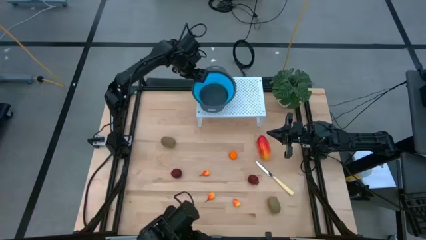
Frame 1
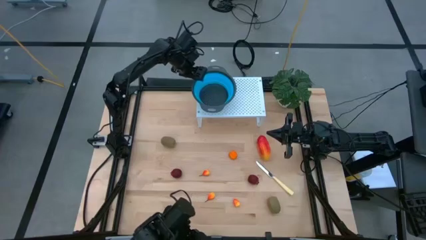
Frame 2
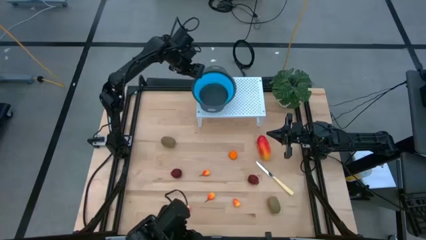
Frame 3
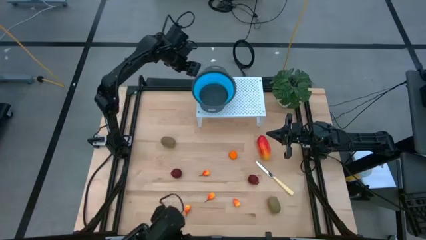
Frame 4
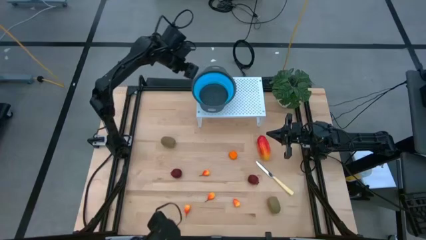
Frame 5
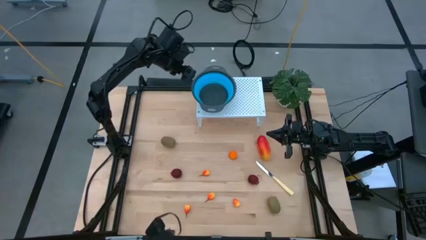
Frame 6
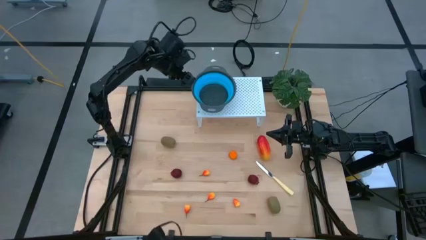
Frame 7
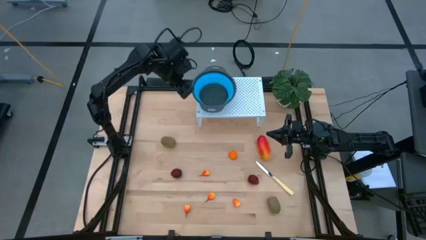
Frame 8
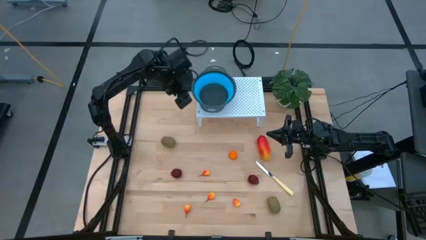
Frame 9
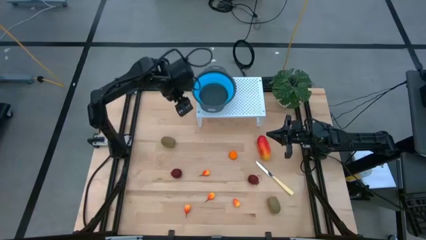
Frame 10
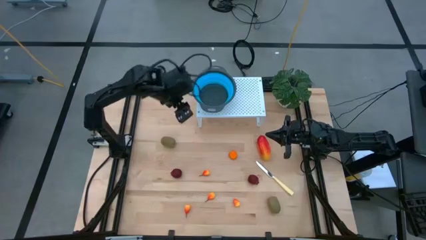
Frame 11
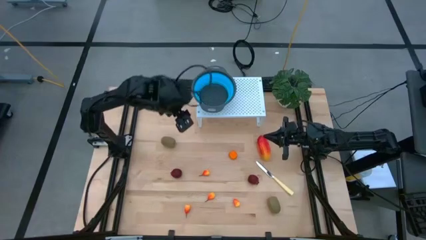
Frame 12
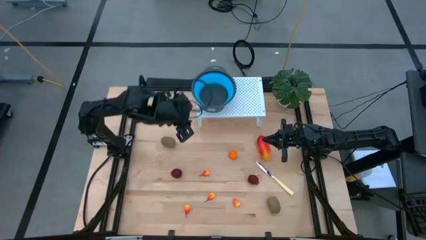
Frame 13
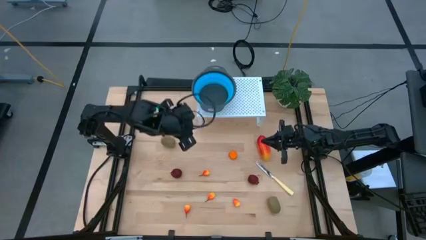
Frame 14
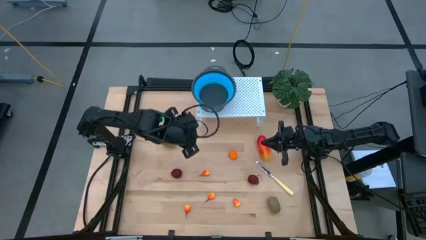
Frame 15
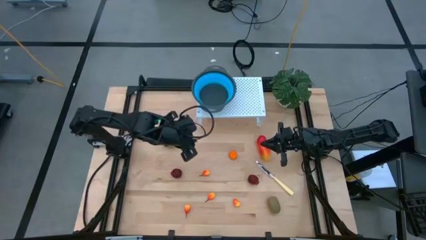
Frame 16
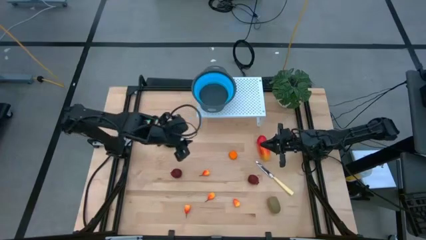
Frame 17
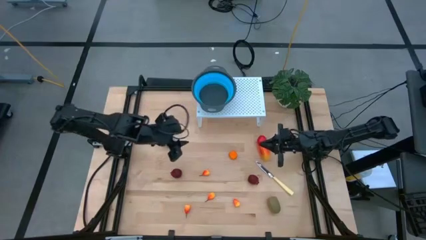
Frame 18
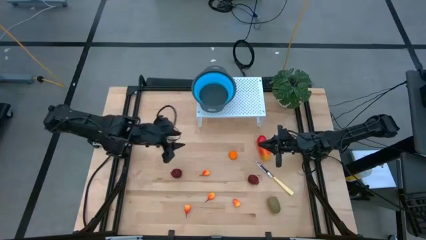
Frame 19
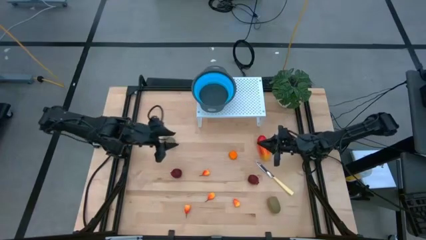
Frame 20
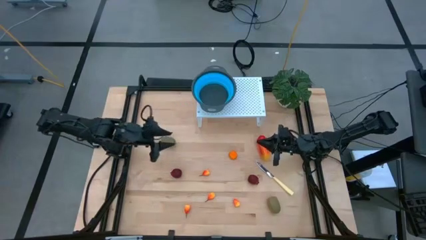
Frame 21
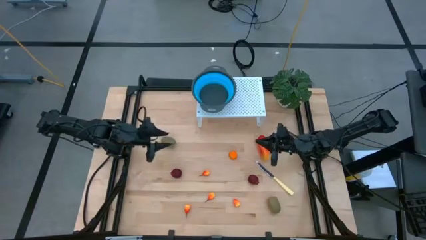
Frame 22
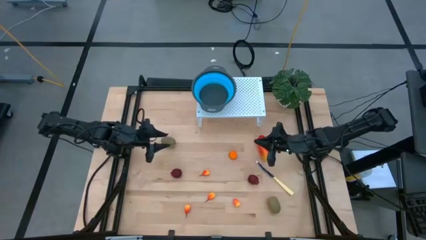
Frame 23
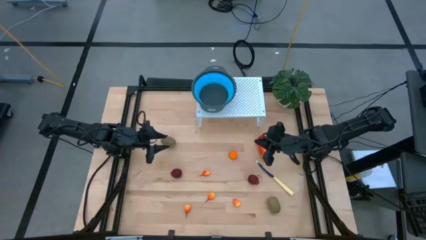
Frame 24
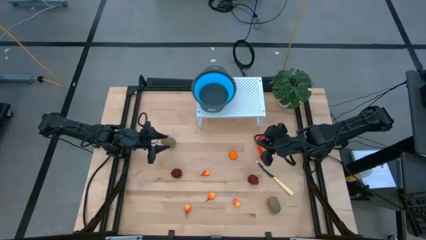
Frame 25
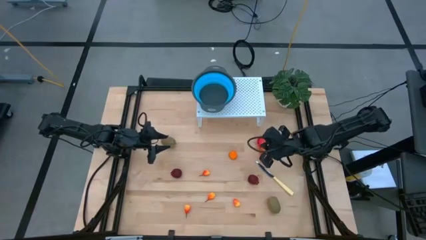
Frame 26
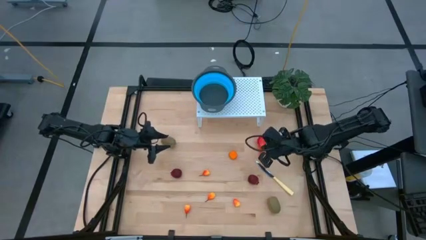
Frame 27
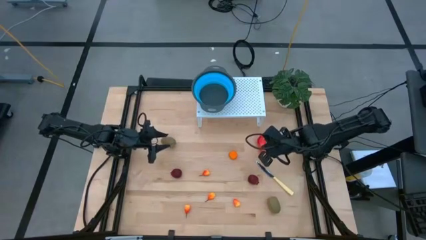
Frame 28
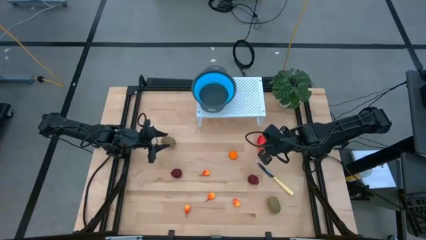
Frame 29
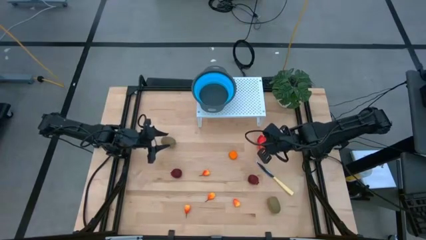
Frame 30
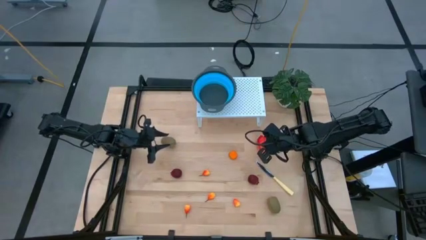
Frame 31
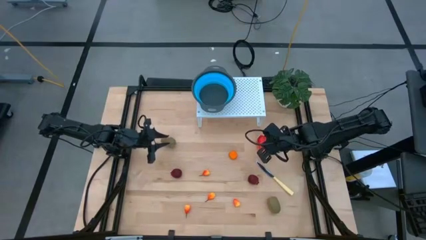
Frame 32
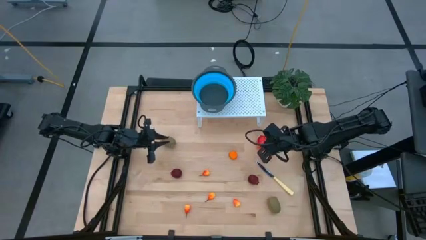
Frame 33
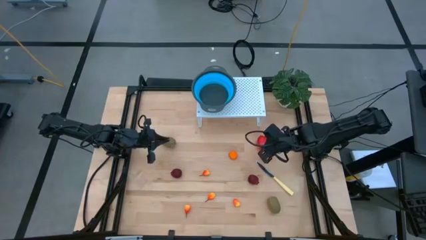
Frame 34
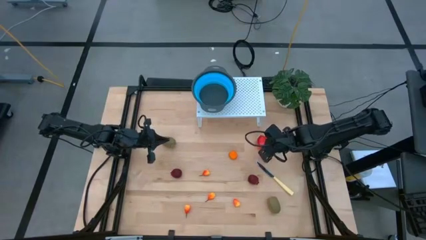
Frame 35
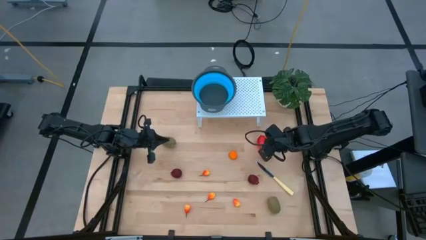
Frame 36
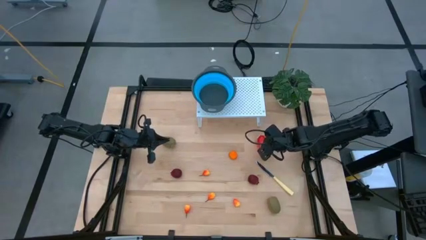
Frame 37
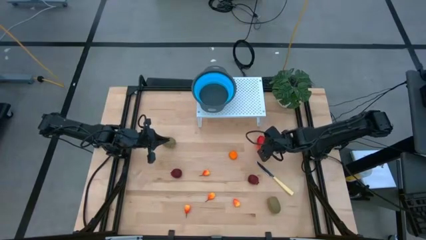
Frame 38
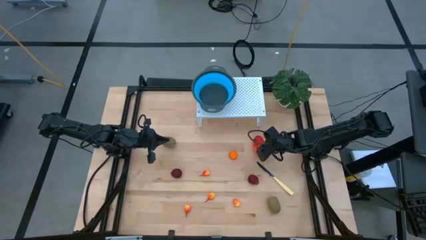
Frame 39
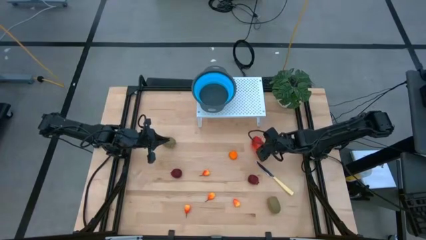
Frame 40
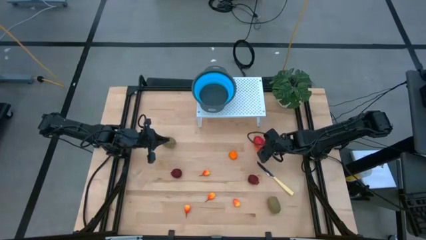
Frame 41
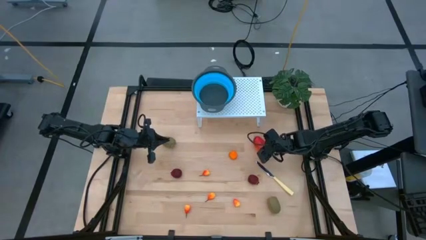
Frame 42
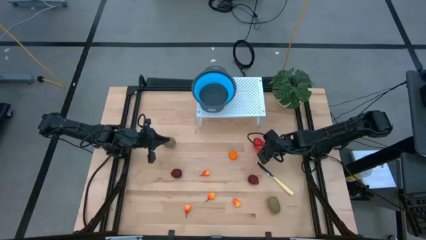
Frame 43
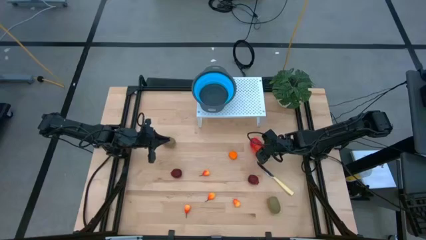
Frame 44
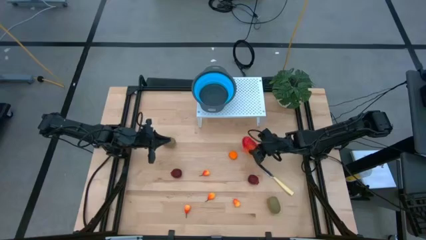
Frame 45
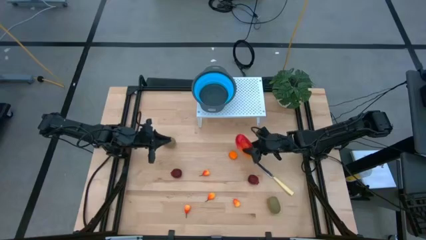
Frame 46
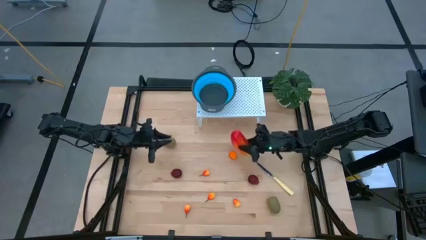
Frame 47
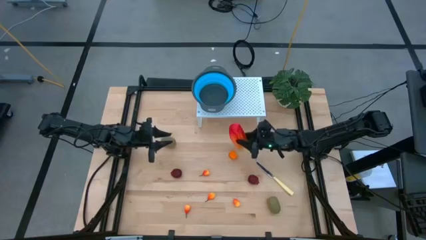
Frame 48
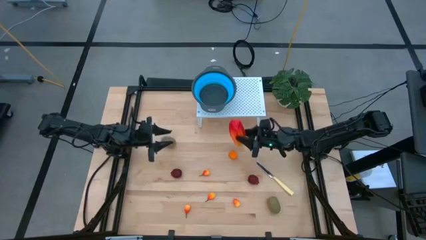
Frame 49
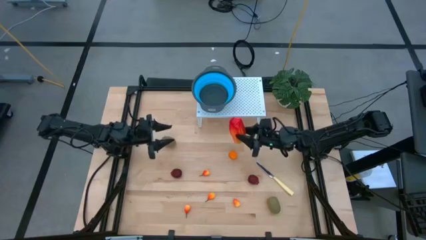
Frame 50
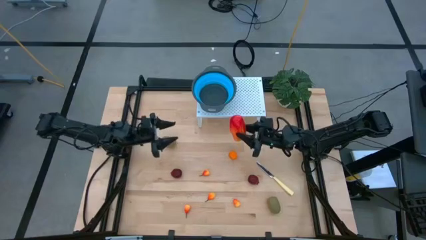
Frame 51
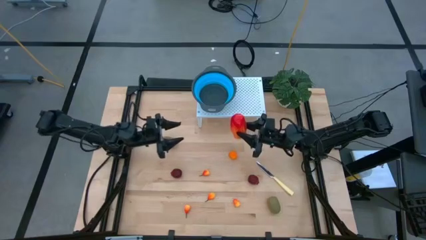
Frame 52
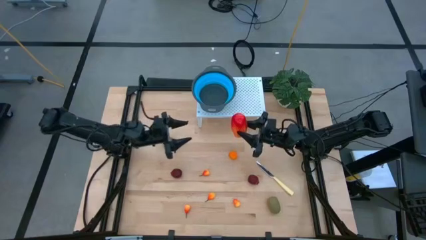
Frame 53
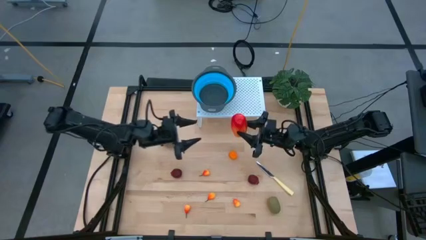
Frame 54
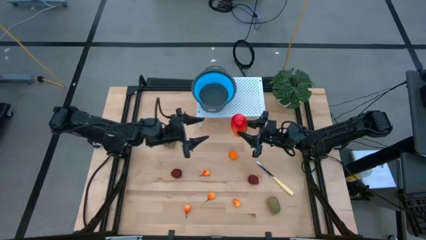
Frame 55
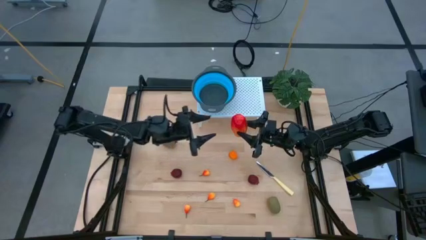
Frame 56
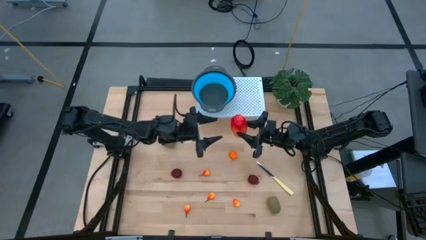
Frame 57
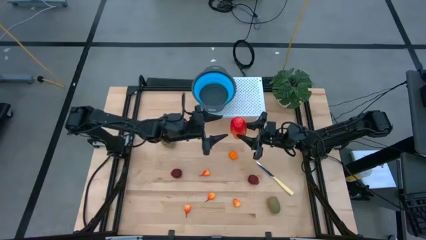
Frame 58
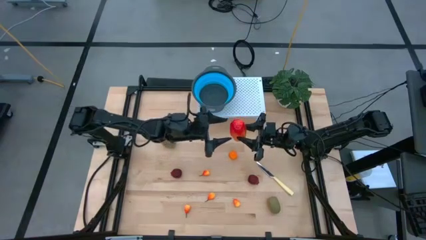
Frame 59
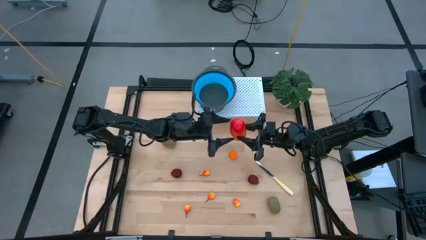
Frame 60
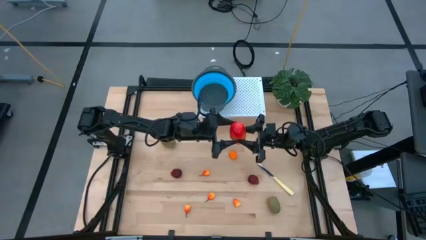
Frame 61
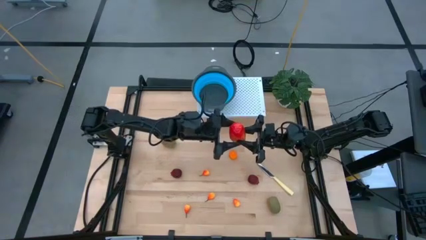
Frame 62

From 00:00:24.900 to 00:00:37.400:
Task: Pick & Place Fruit
Put the mango into the blue strainer bowl on the shelf
